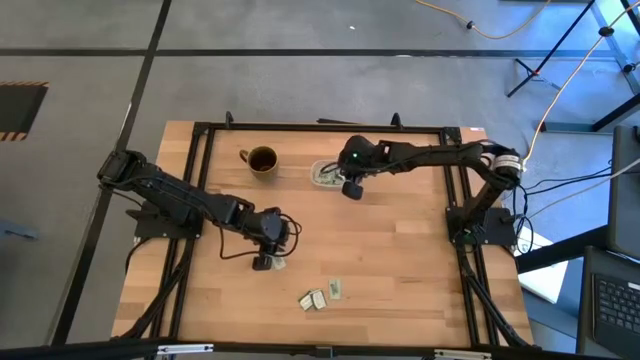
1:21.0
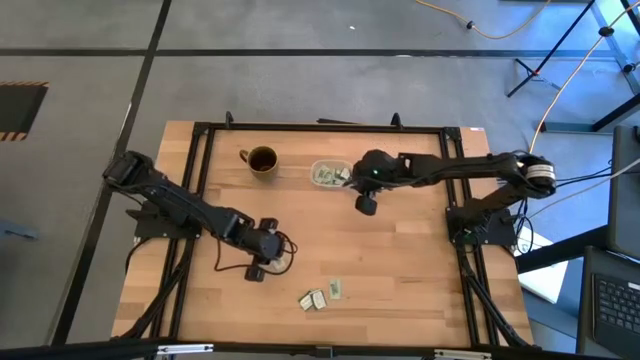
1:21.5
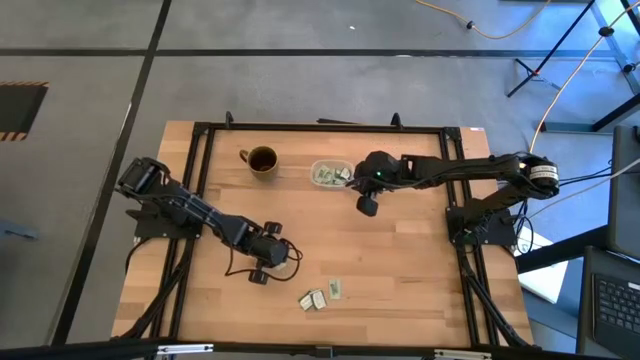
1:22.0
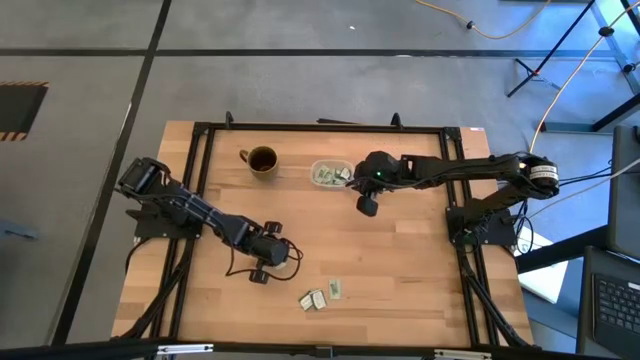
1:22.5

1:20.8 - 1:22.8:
Task: Pick and place Stevia / Truvia into bins
Put the stevia packet into the transparent container

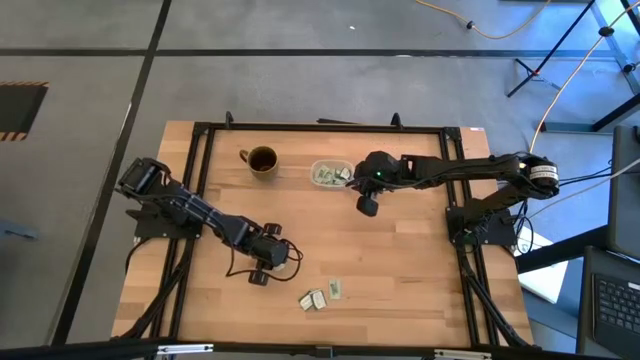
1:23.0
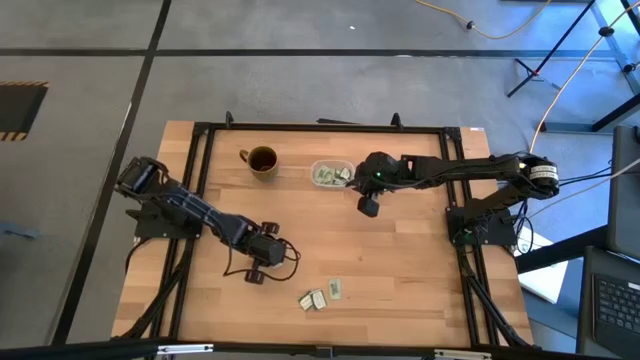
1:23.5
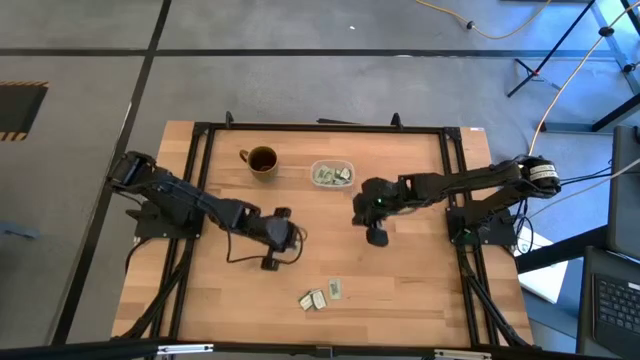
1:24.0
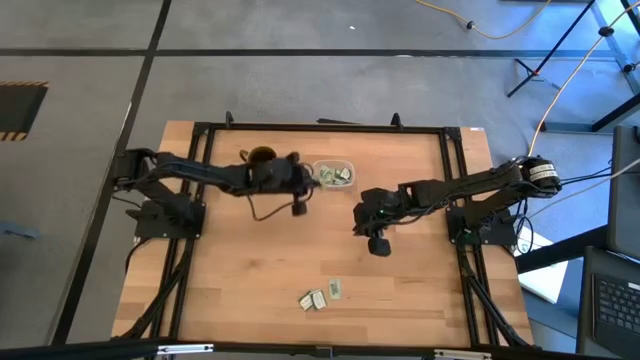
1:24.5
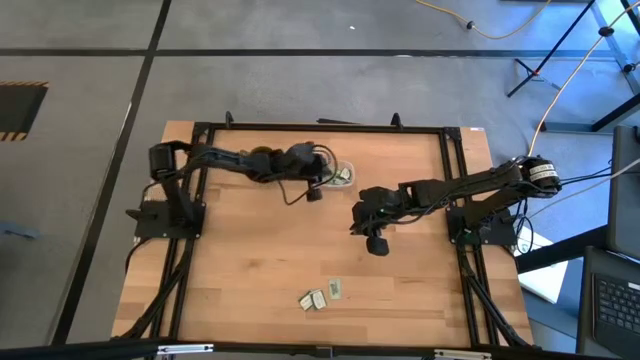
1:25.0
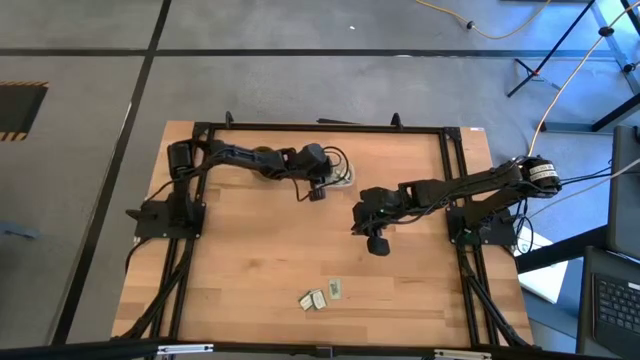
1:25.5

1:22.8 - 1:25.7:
Put the stevia packet into the transparent container

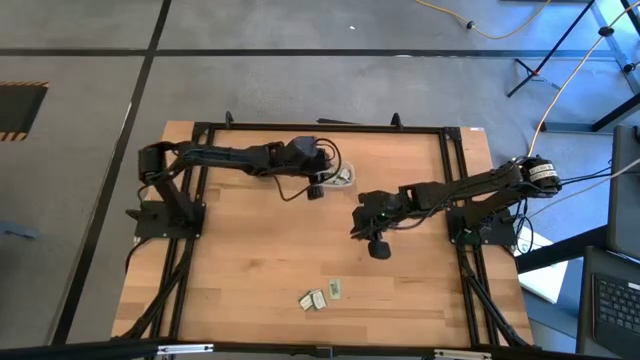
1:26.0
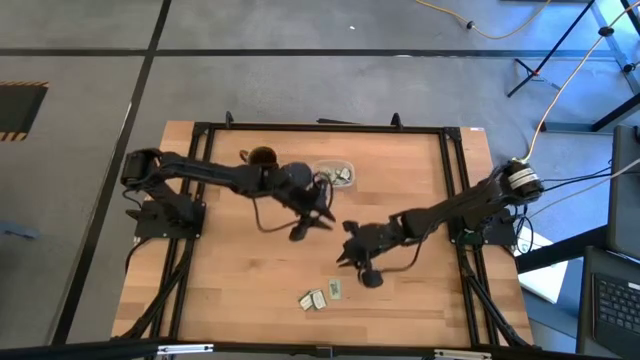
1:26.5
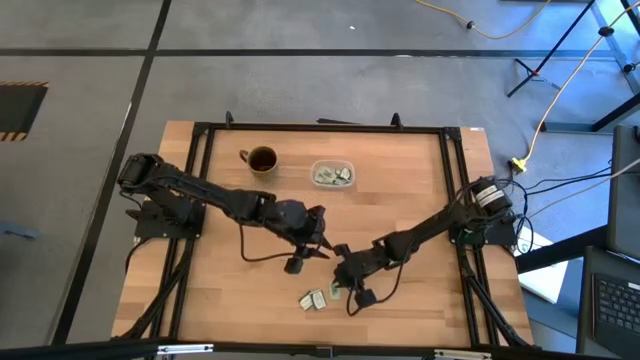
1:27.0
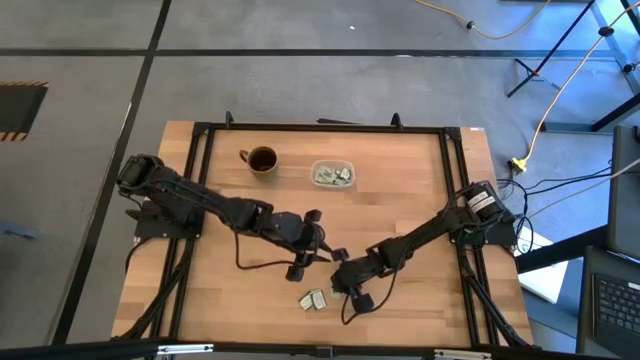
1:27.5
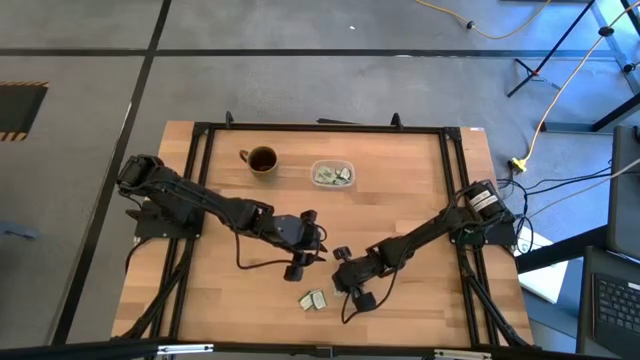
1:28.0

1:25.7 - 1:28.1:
Put the stevia packet into the transparent container

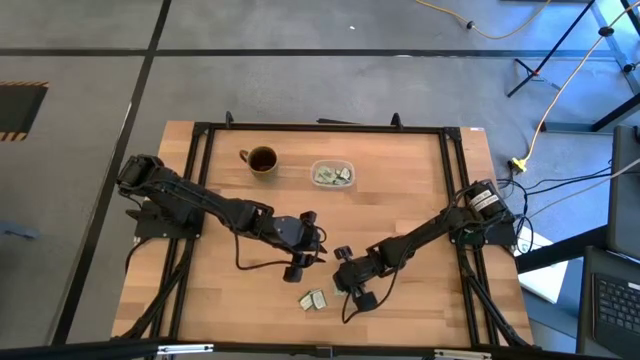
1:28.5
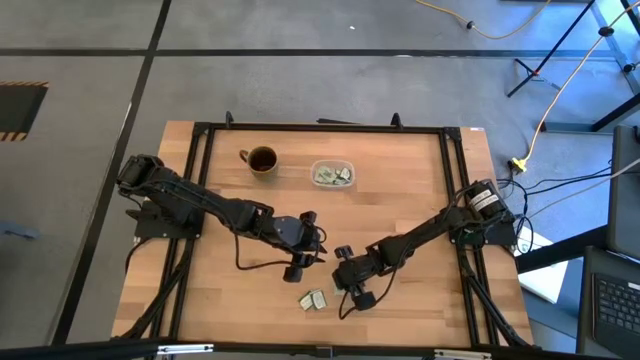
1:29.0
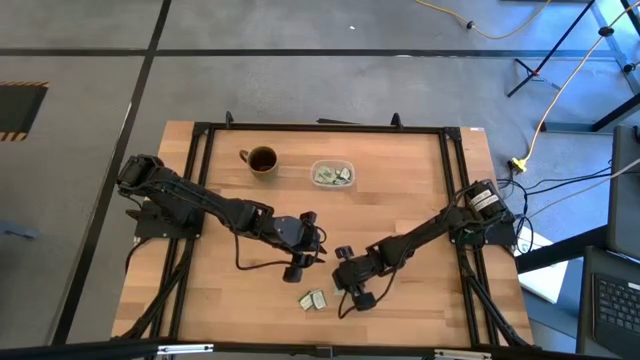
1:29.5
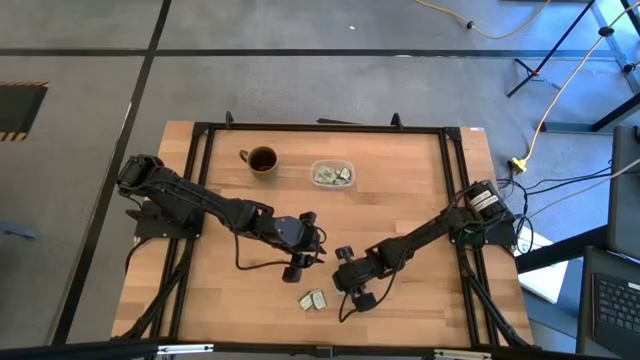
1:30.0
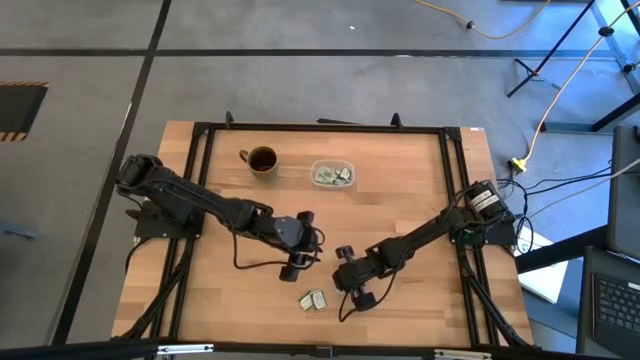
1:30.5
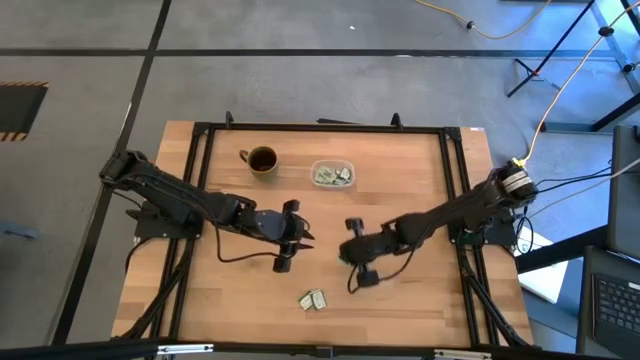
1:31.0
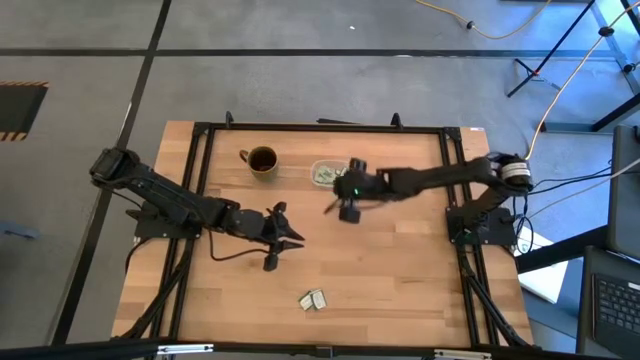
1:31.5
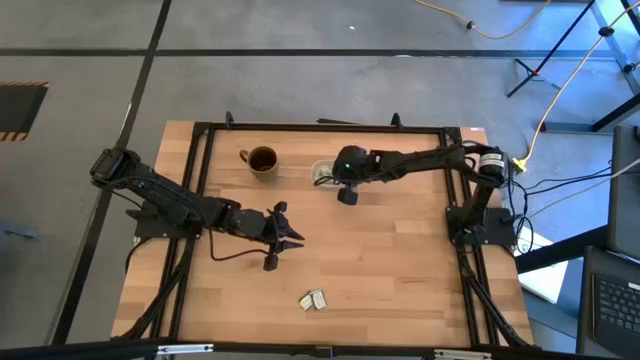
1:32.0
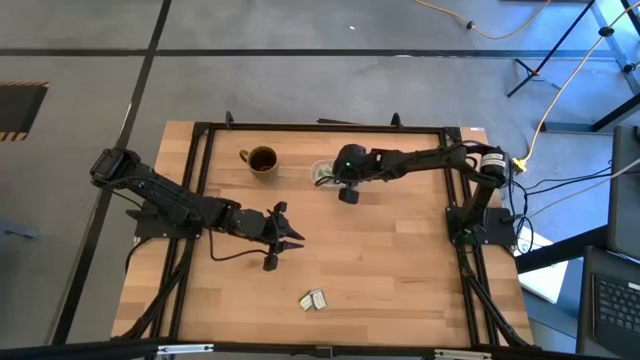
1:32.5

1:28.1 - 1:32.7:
Put the stevia packet into the transparent container

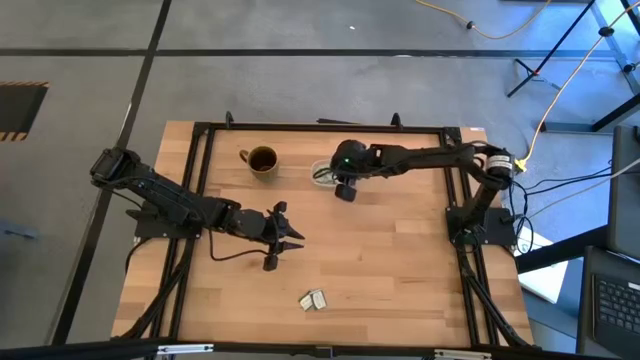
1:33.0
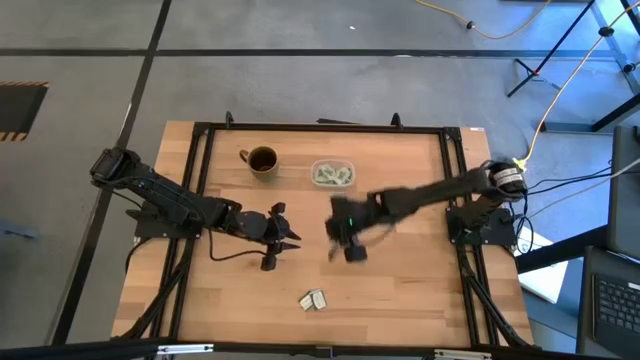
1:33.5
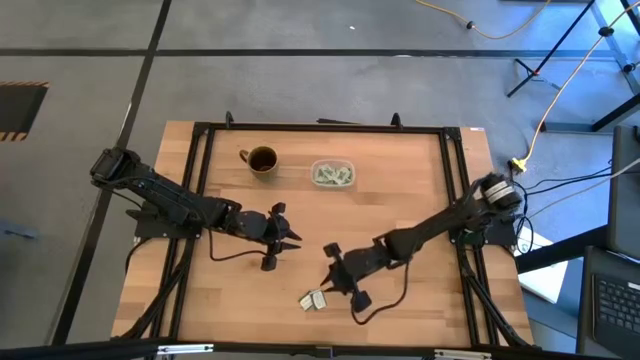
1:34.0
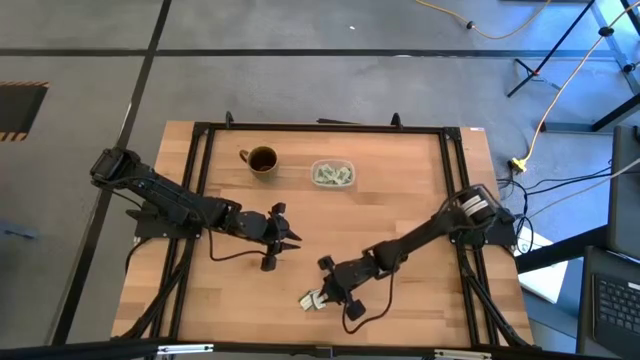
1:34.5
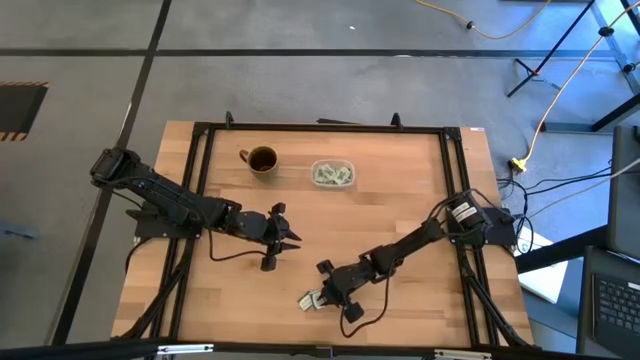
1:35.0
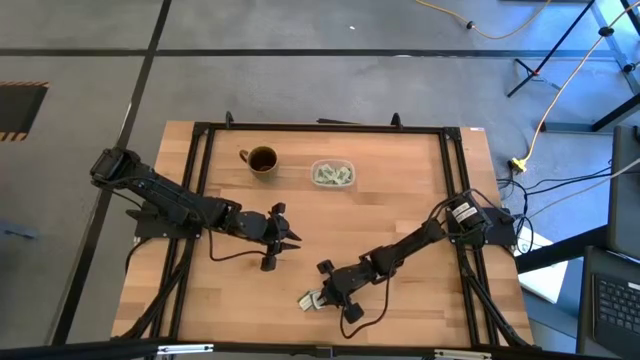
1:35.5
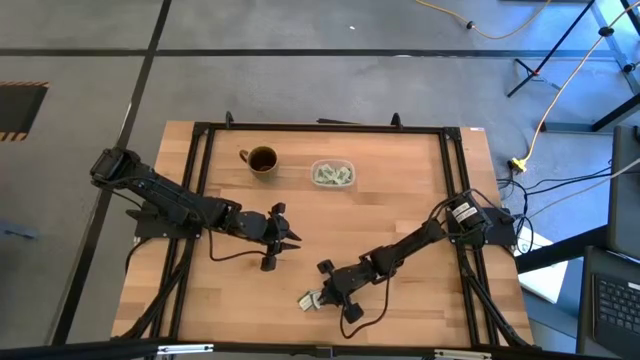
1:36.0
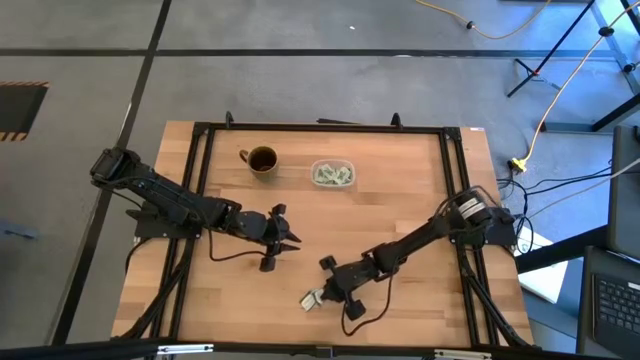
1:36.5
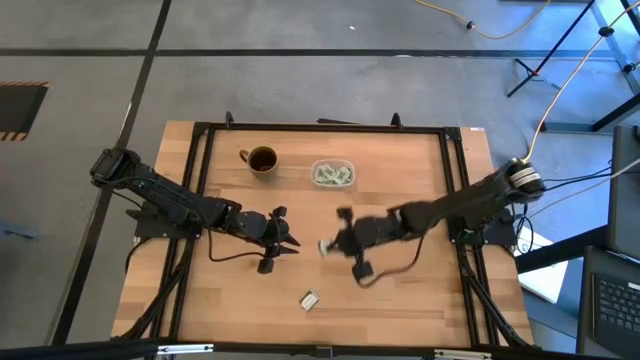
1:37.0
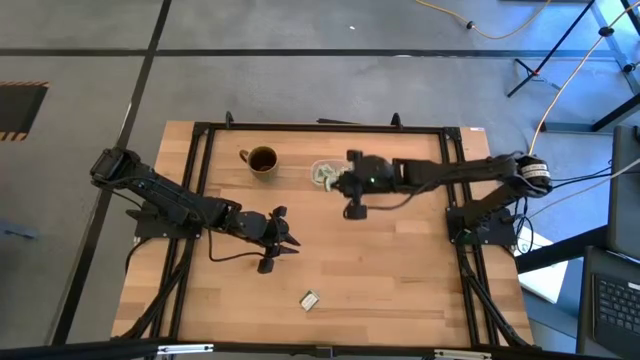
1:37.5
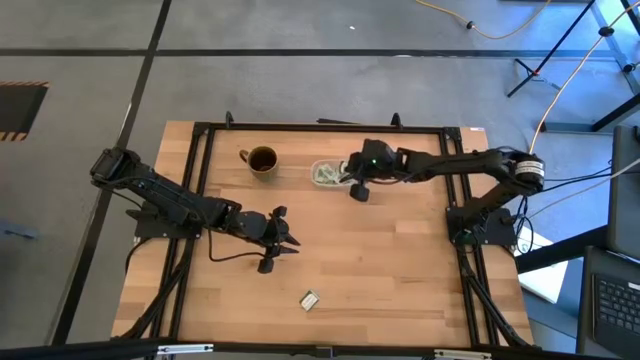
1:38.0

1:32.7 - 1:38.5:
Put the truvia packet into the transparent container

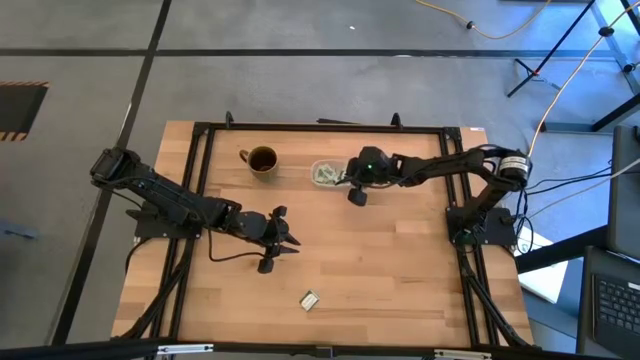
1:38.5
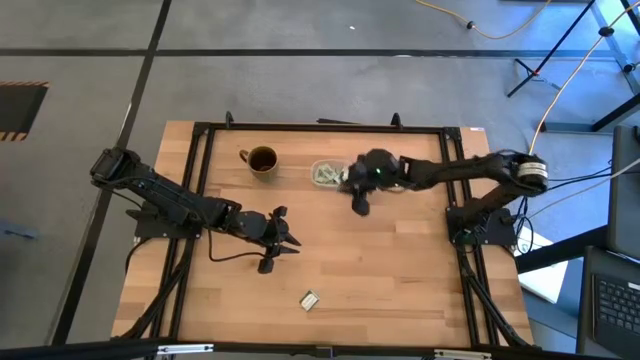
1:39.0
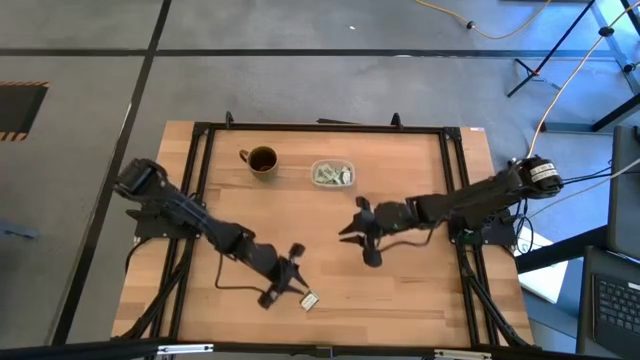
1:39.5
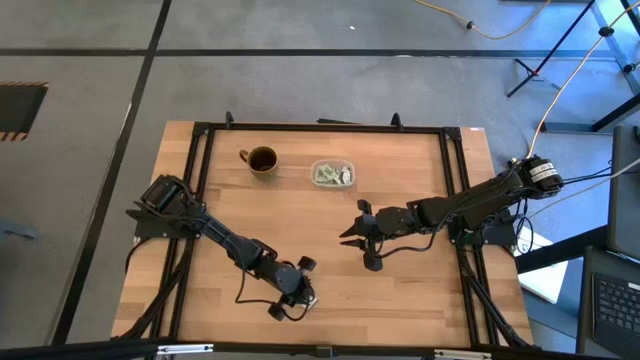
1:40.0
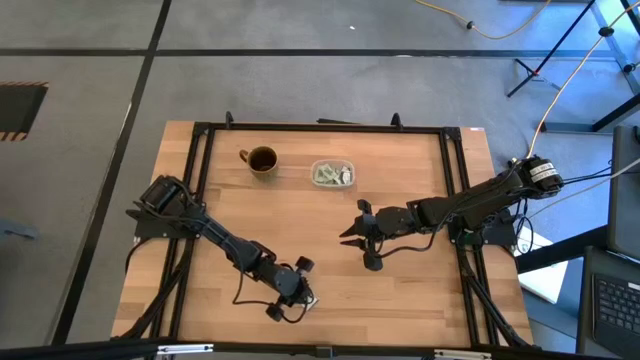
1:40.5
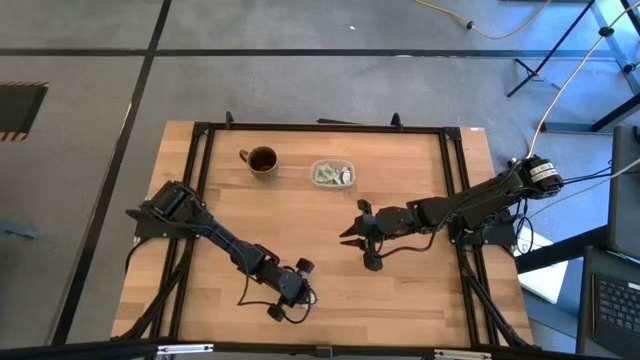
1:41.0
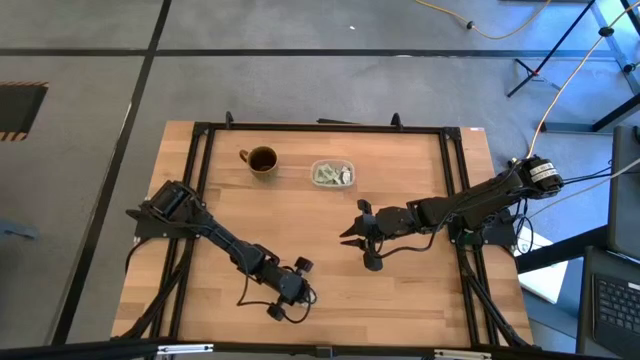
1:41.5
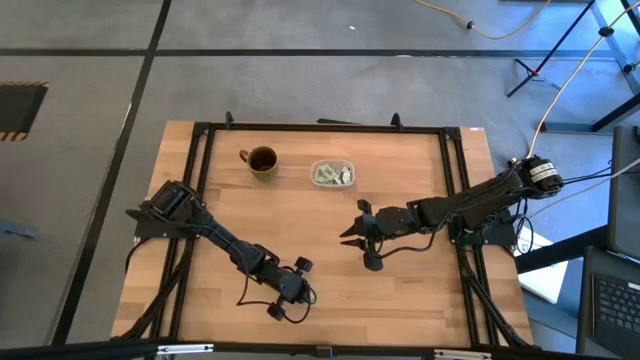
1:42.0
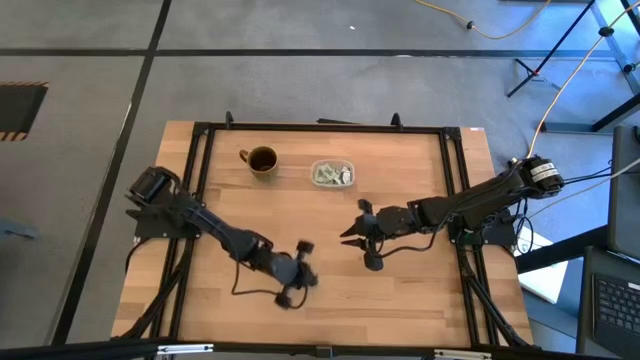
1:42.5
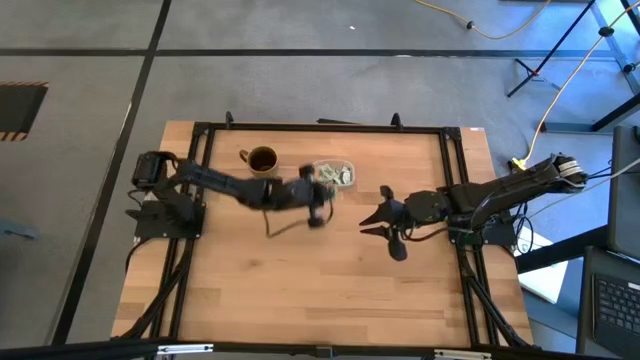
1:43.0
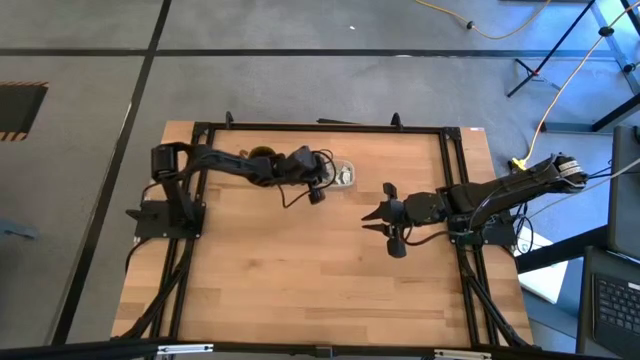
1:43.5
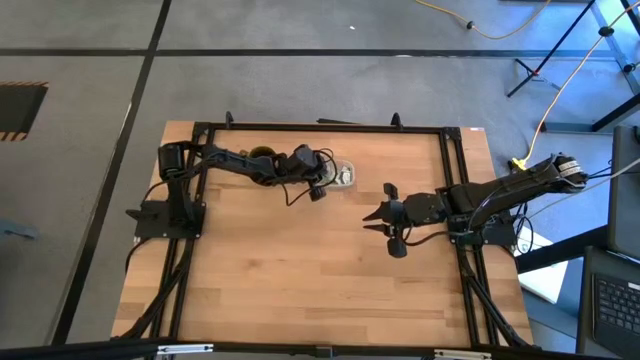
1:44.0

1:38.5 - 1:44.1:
Put the truvia packet into the transparent container
